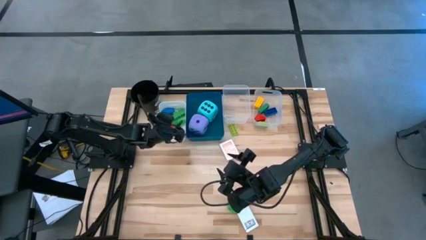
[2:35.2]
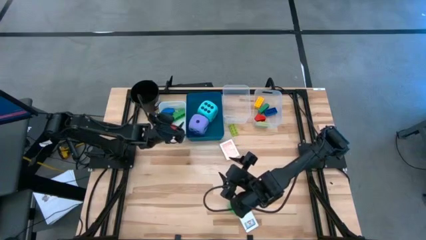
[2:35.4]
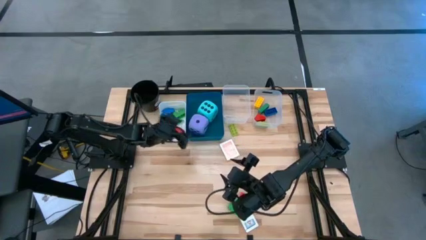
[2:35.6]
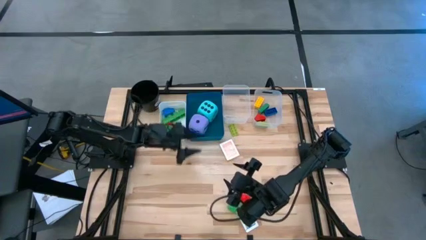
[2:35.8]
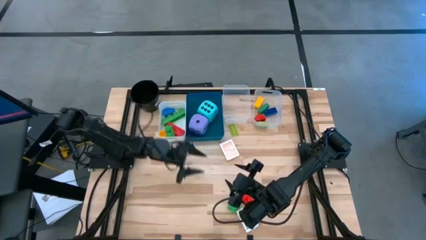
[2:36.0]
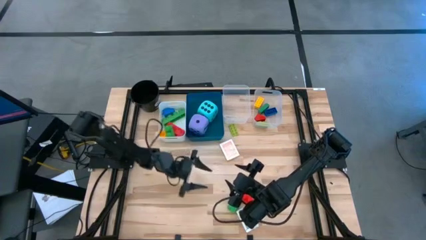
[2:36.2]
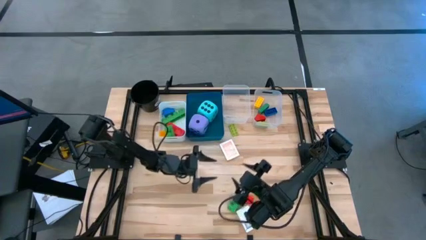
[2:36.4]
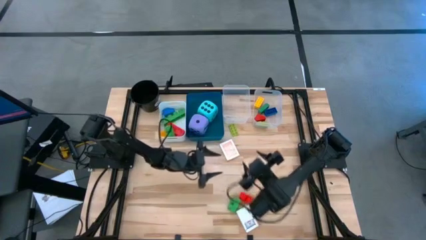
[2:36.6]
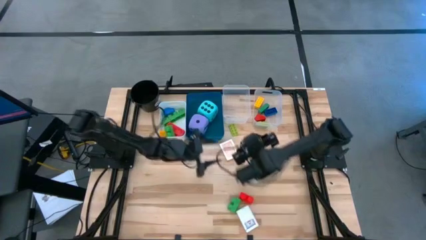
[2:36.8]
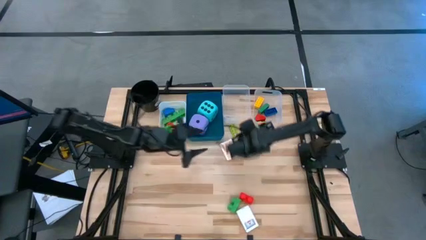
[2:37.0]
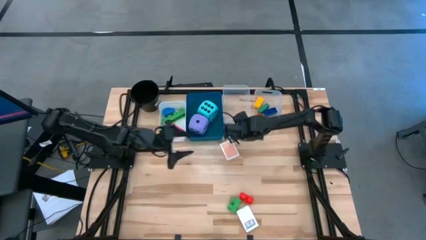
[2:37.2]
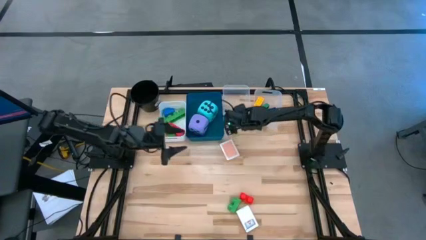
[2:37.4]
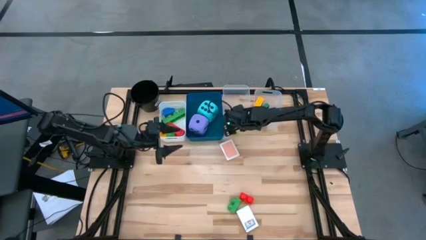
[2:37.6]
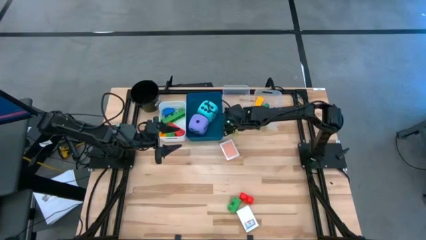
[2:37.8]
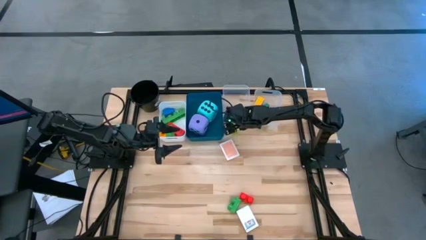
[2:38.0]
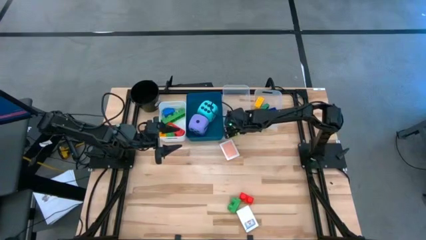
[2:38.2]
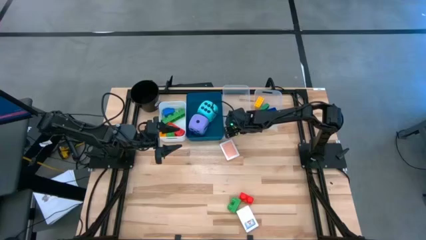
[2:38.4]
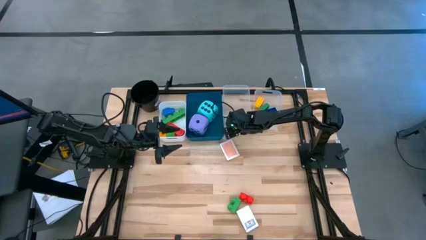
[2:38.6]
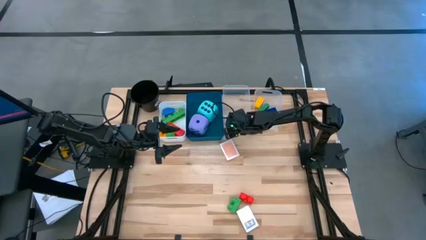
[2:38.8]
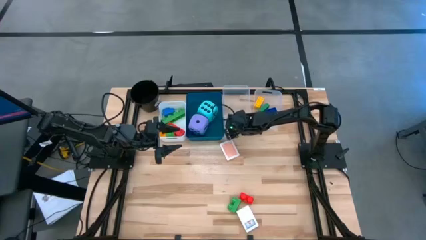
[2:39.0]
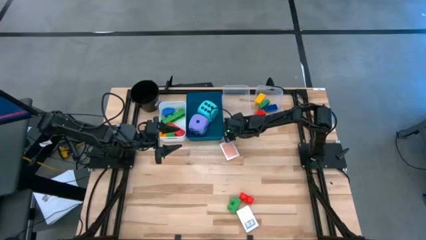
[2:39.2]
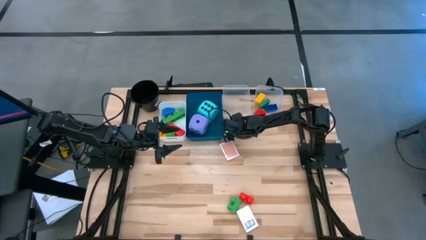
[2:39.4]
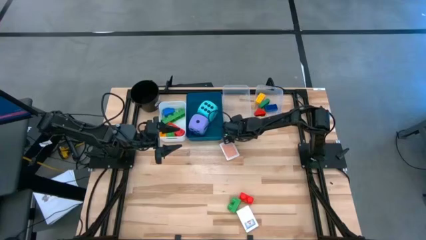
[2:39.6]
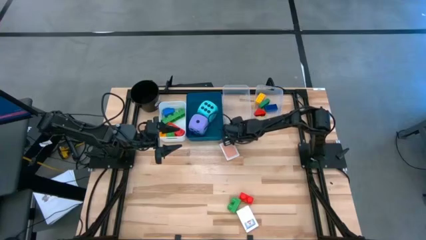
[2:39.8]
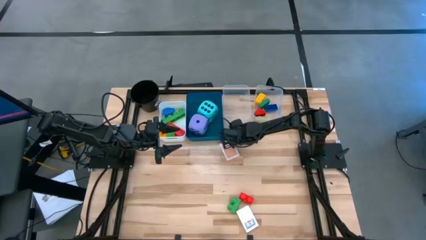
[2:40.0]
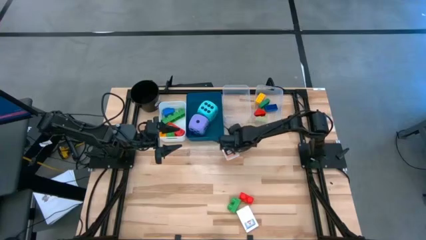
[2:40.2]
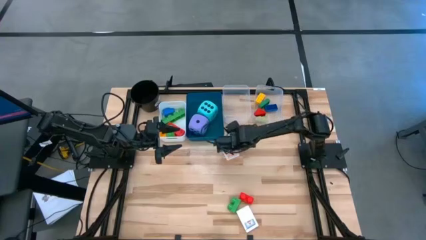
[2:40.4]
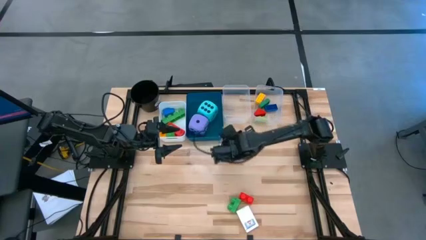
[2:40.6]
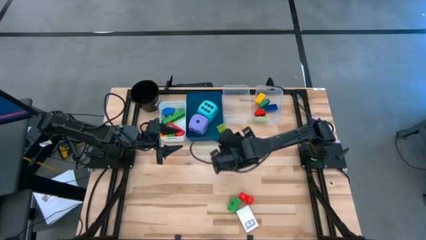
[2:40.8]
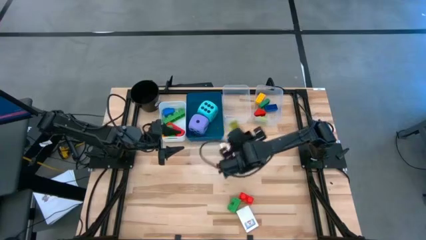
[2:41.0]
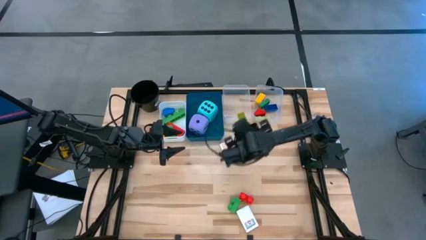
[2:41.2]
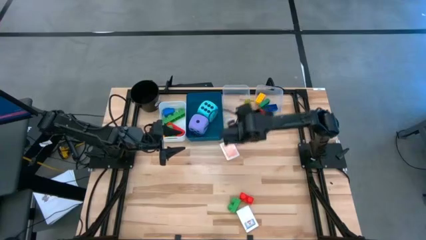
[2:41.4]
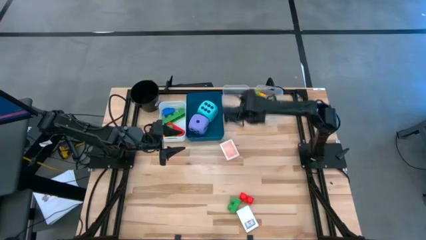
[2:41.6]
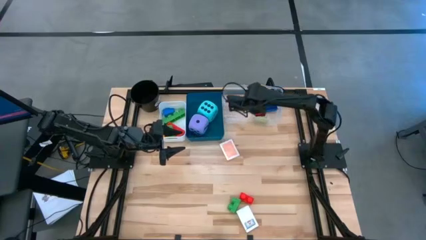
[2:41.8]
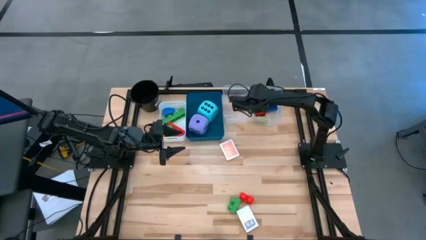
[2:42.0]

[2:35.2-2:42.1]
Task: Pick & Place Toys
Put the small light green game piece into the right transparent bin

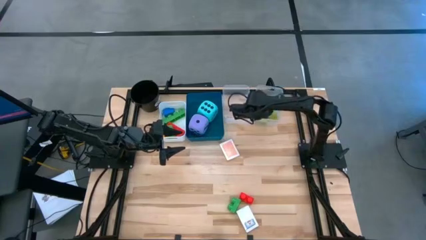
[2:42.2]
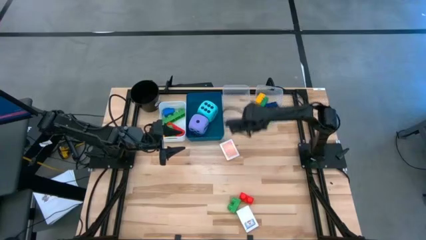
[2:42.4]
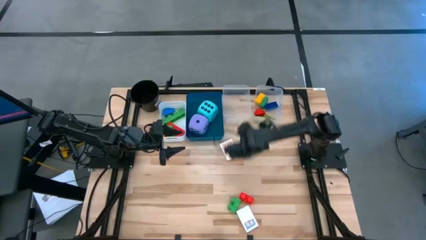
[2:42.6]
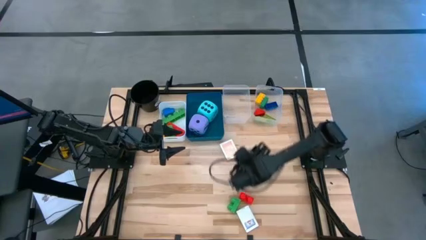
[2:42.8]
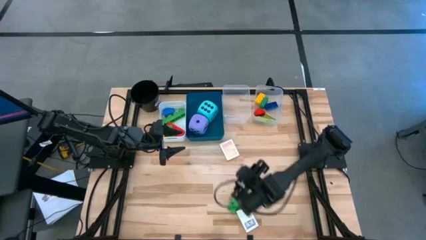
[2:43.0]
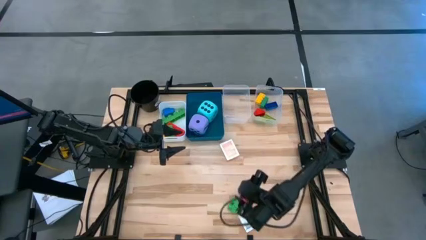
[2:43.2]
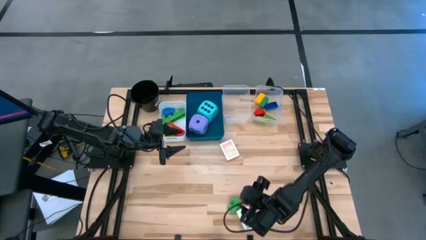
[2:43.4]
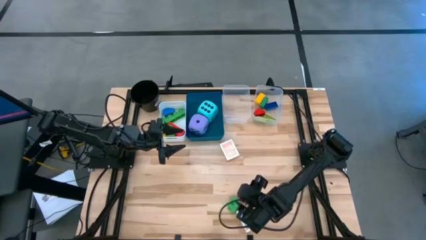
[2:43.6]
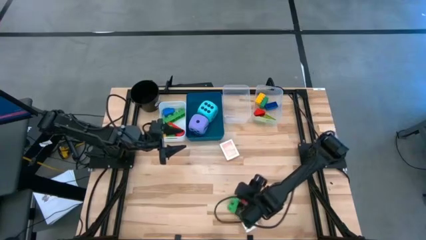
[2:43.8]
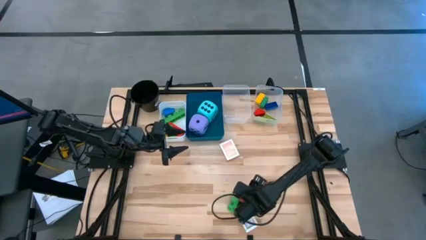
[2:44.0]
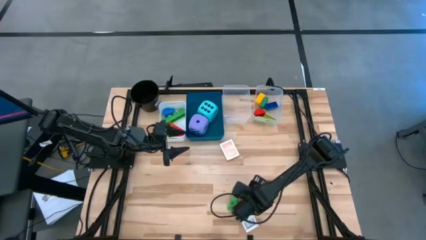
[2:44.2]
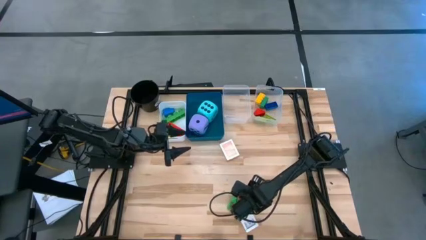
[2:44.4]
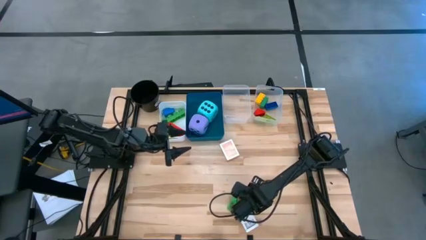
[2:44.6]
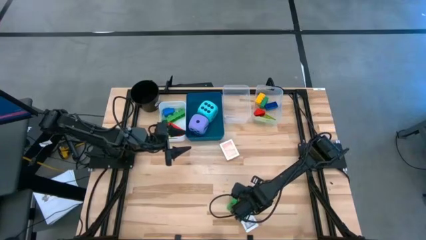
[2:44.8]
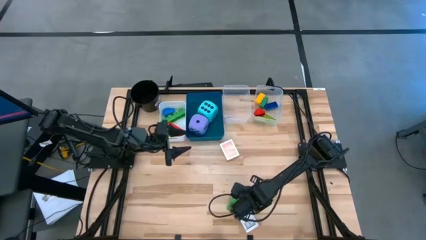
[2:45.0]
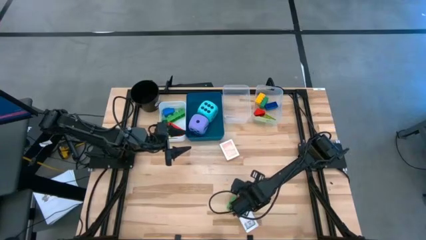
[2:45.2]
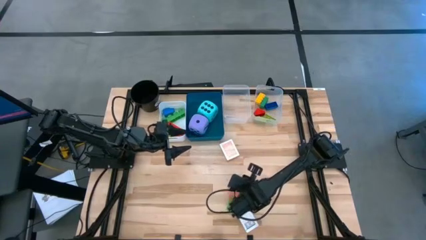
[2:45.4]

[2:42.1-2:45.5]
Put the large red game piece into the white bin

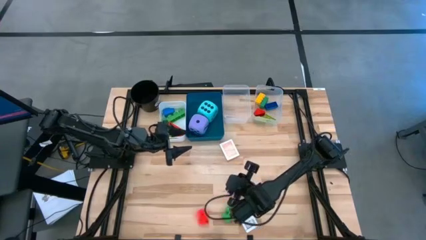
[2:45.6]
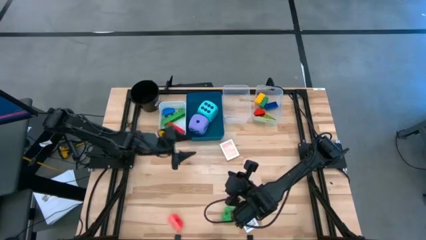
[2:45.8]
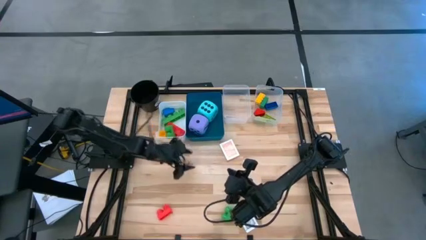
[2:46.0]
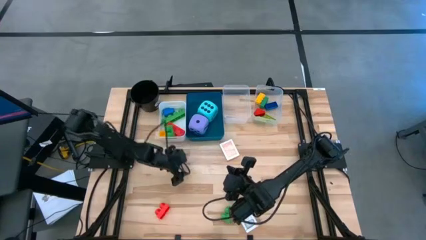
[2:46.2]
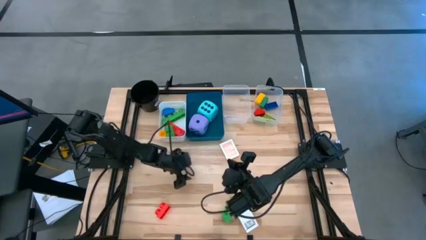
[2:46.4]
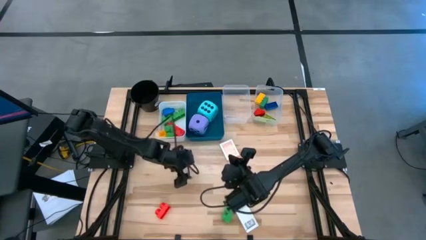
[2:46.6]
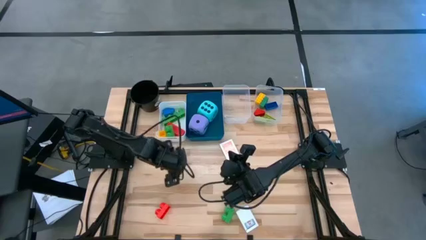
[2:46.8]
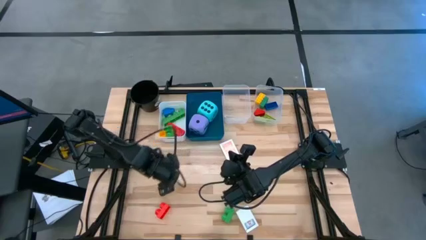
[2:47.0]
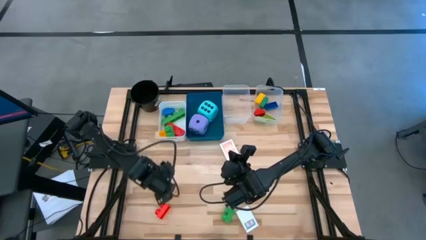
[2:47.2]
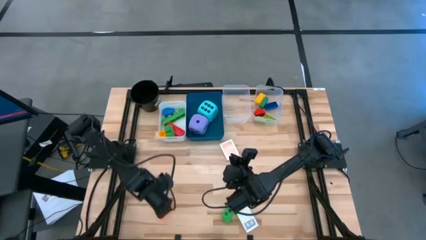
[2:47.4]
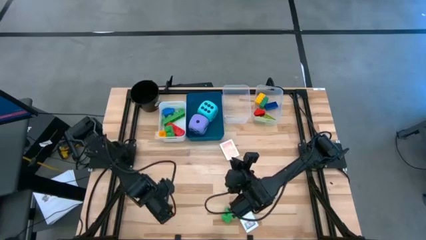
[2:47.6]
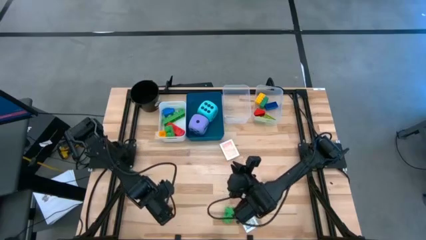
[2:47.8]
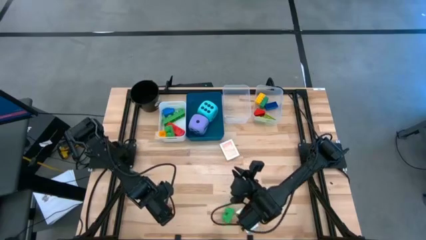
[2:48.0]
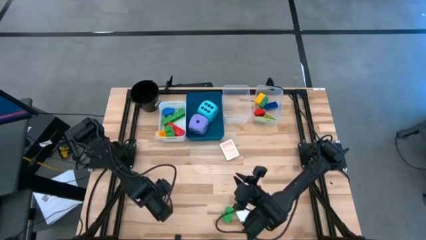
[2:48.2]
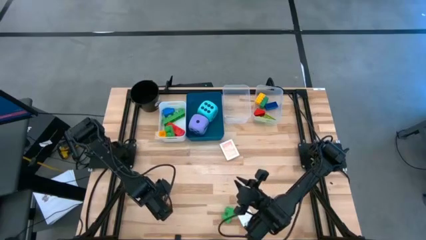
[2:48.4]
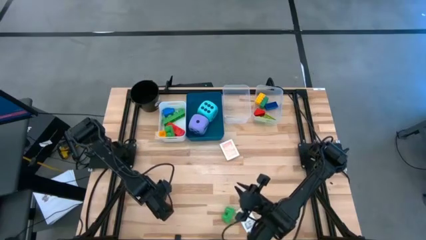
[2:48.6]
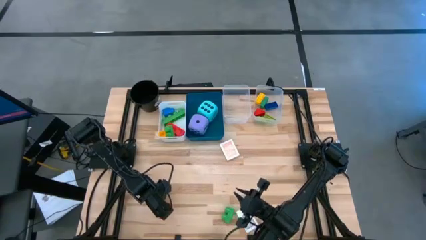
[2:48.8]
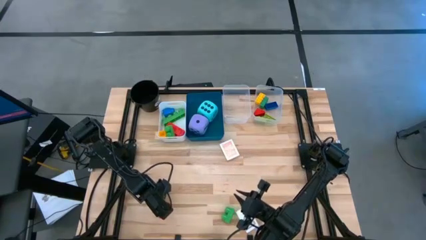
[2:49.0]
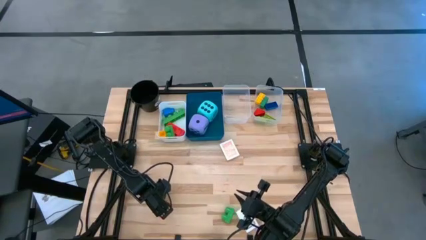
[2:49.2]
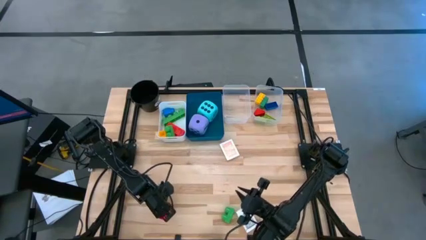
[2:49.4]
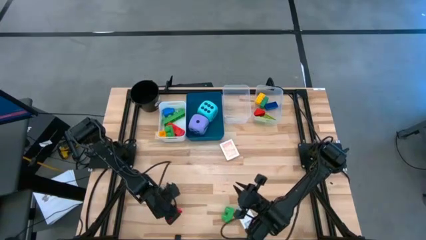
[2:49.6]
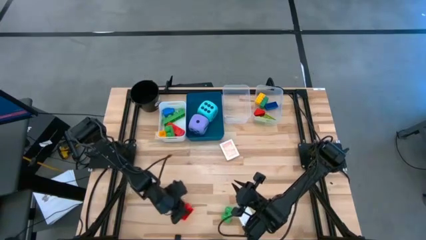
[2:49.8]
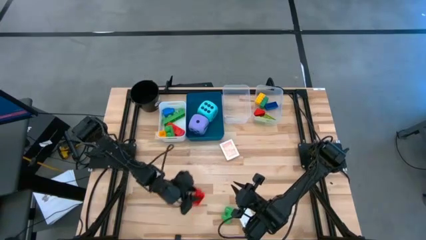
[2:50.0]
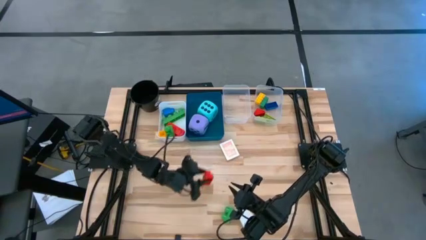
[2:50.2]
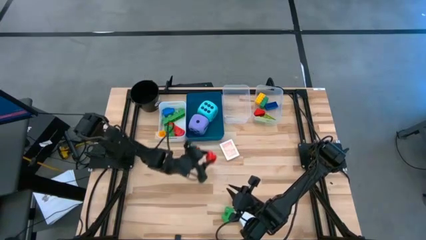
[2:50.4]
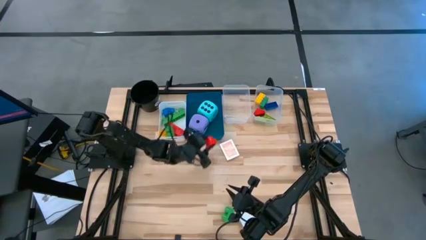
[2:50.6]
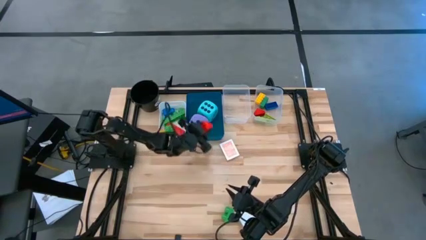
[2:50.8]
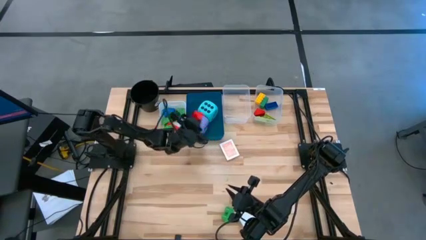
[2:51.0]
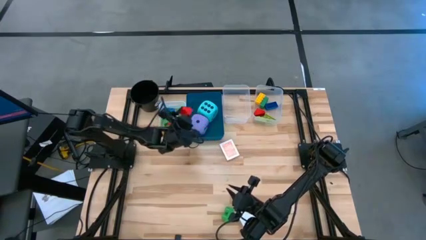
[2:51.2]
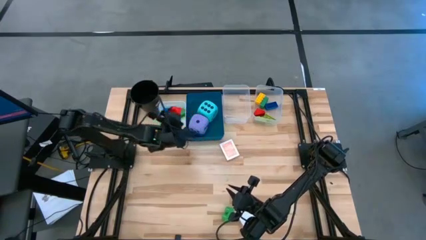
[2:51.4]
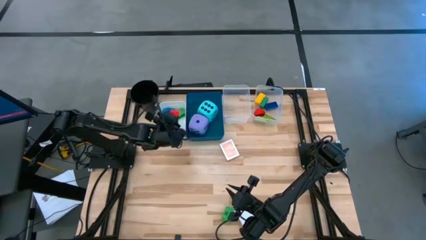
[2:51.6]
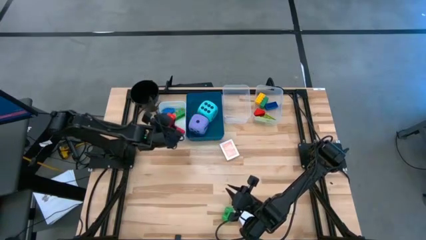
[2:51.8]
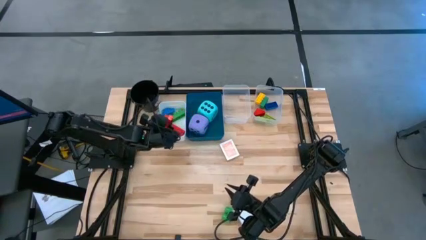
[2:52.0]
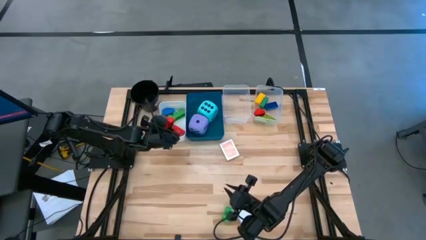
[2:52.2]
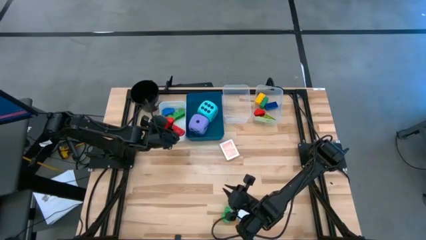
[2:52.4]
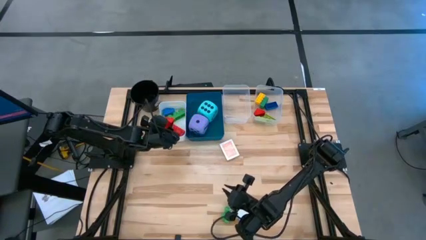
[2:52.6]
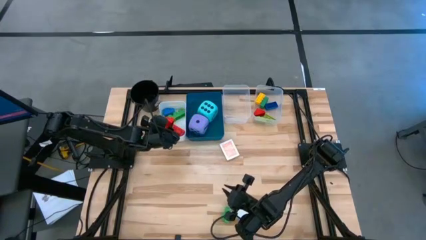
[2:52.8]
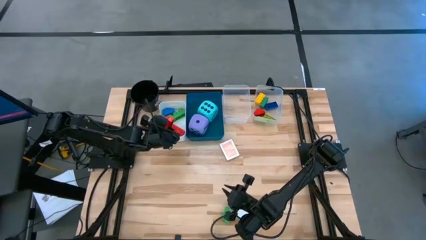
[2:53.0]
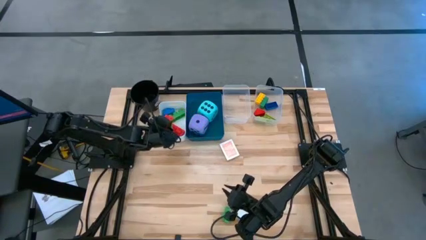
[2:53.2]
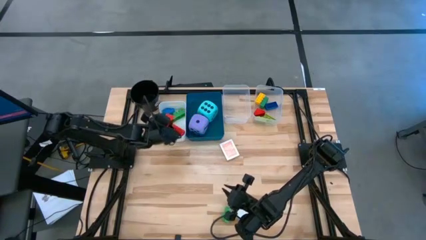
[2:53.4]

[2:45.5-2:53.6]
Put the large red game piece into the white bin
